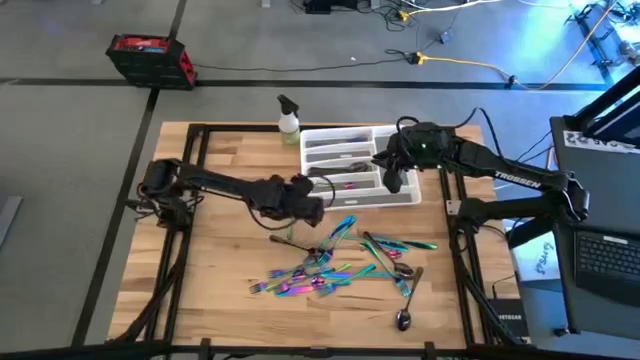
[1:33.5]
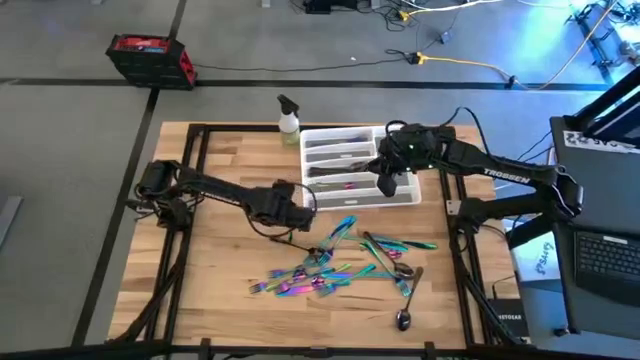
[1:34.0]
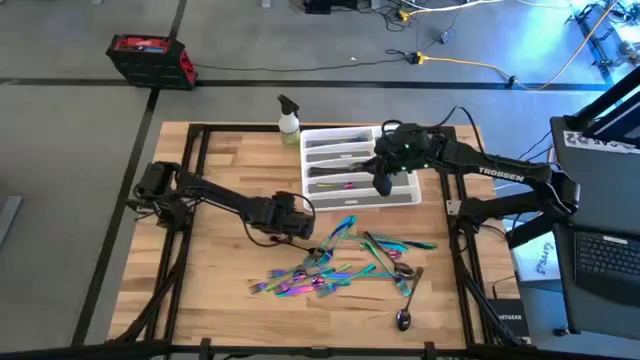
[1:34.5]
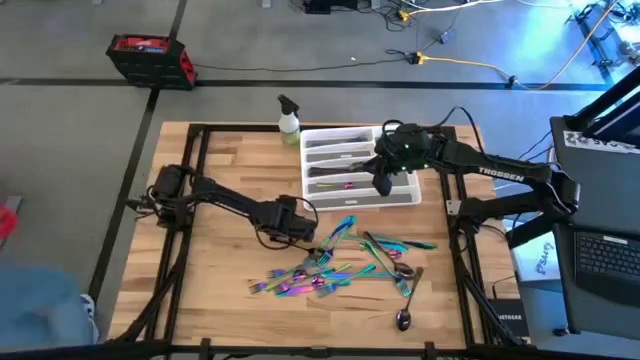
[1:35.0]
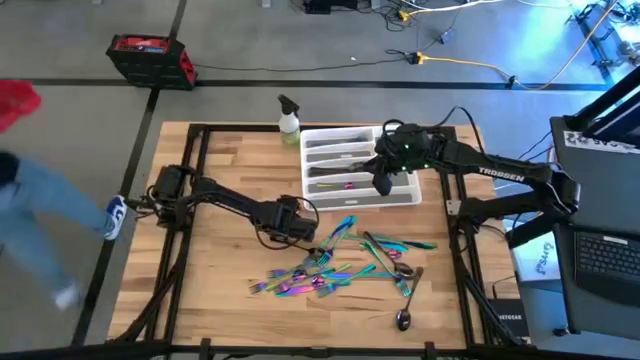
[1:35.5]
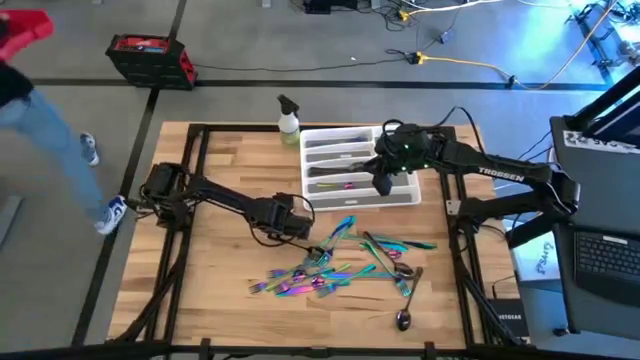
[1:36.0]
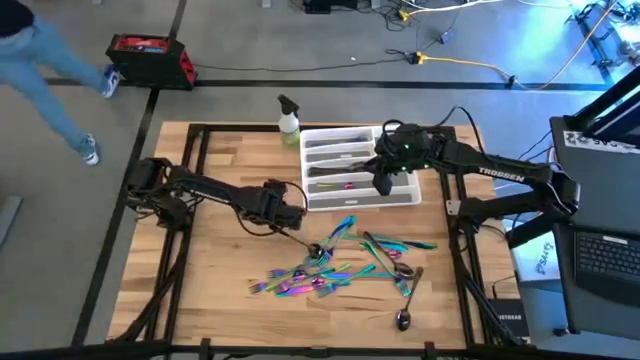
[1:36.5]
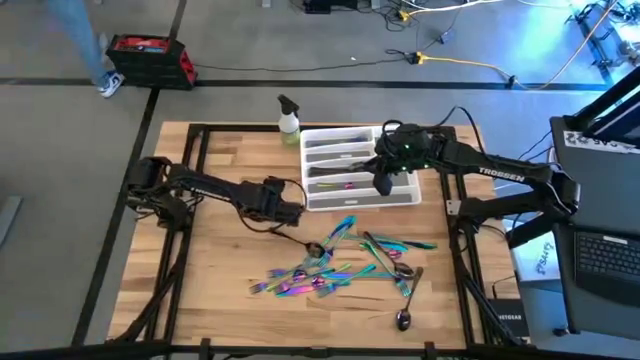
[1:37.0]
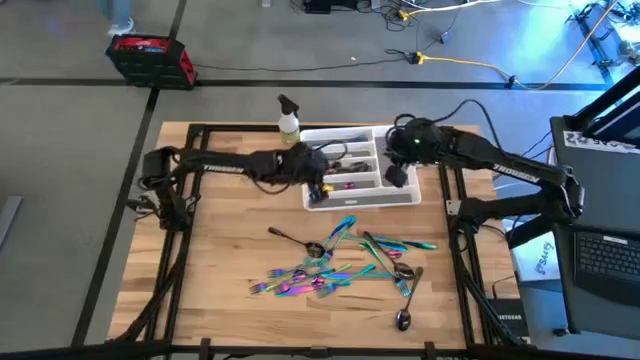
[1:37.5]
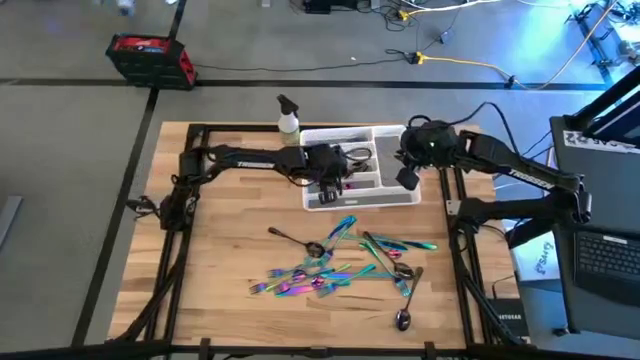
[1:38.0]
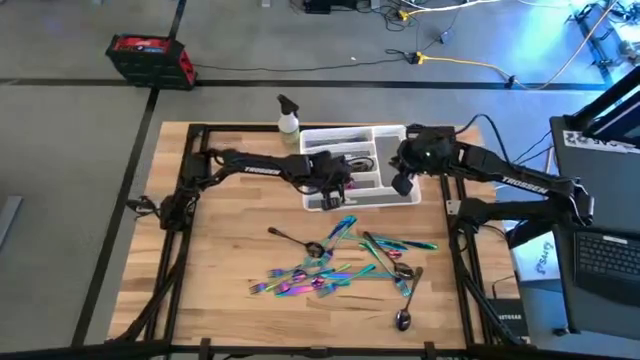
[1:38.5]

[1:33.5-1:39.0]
Task: Sort silverware
Put the blue teaspoon on the white silverware tray

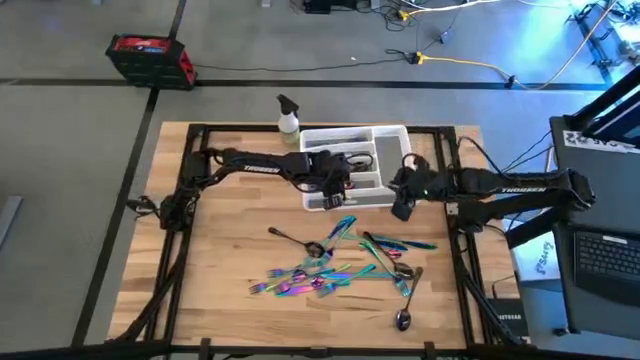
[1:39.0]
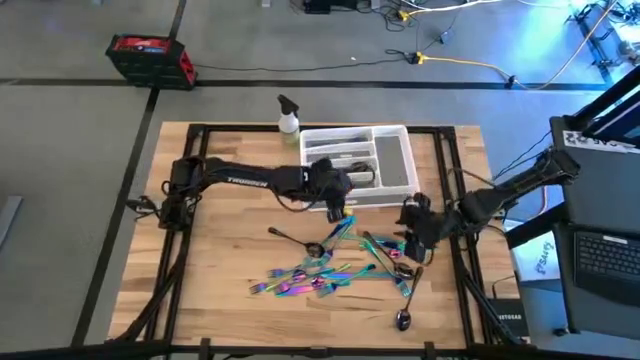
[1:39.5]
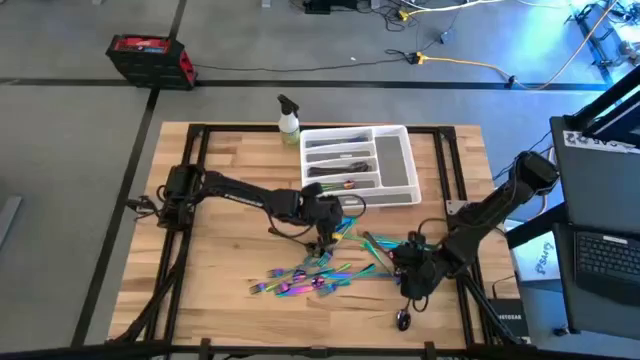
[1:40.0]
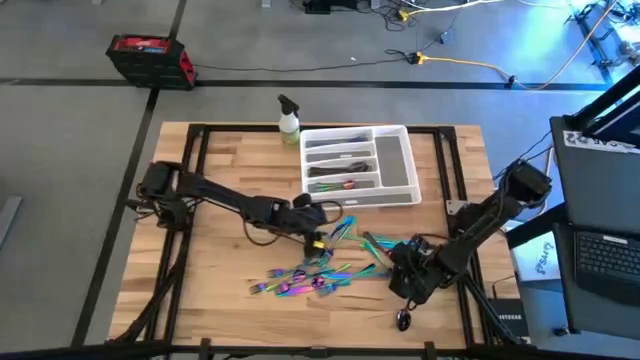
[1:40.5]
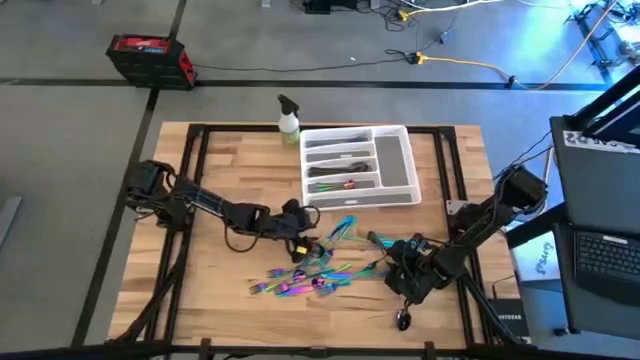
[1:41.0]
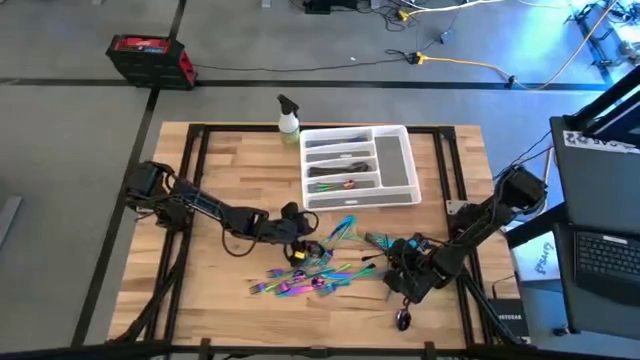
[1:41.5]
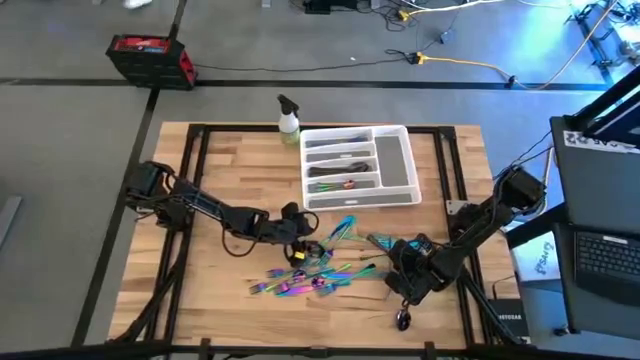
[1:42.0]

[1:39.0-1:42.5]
Put the black spoon on the white silverware tray

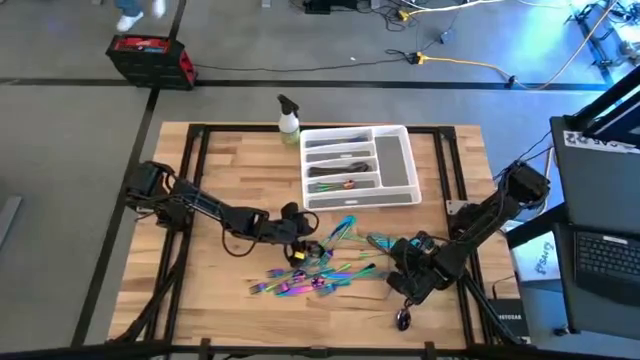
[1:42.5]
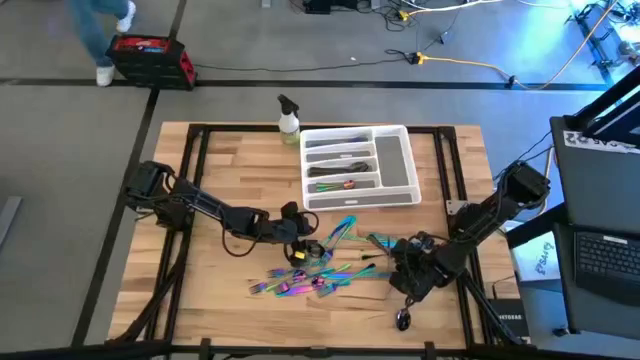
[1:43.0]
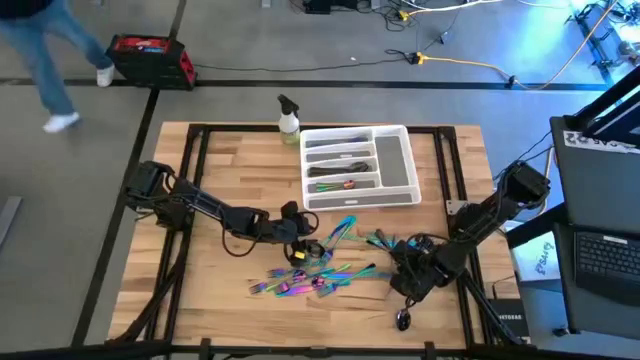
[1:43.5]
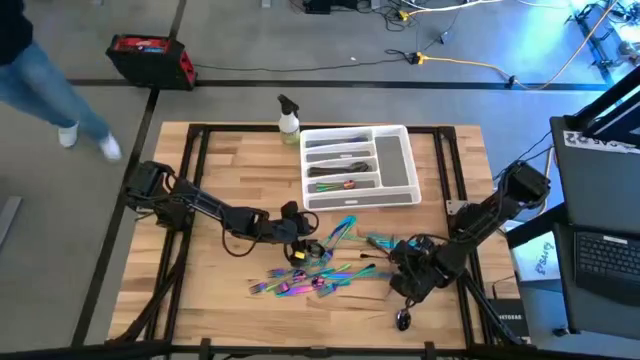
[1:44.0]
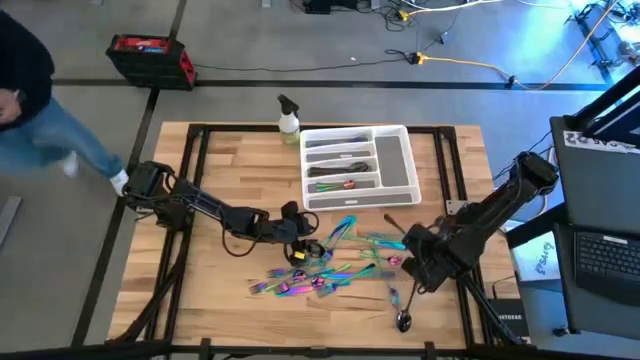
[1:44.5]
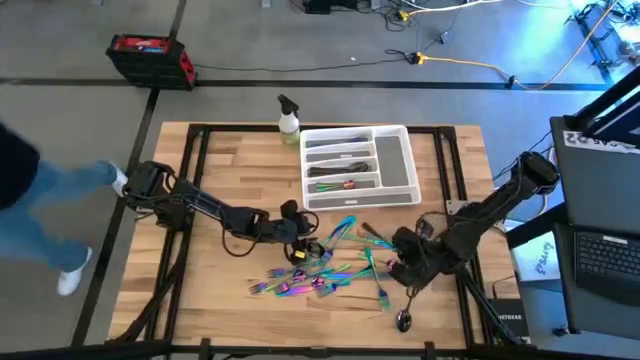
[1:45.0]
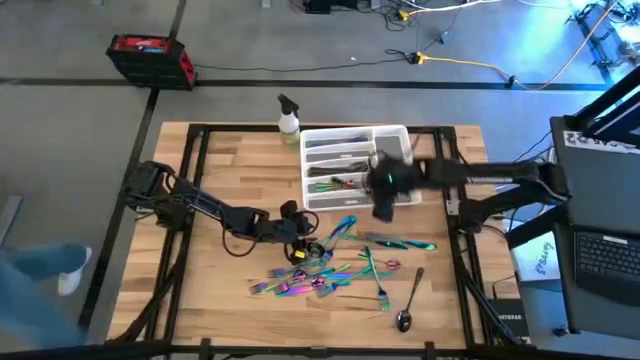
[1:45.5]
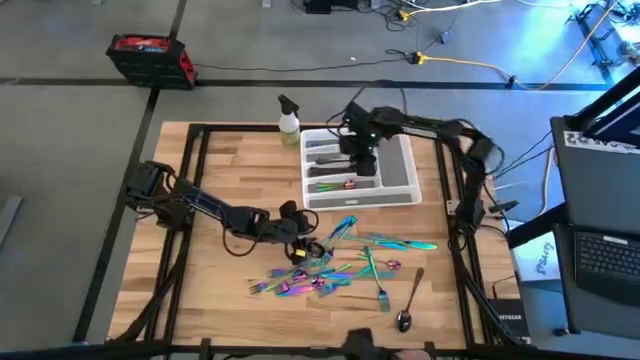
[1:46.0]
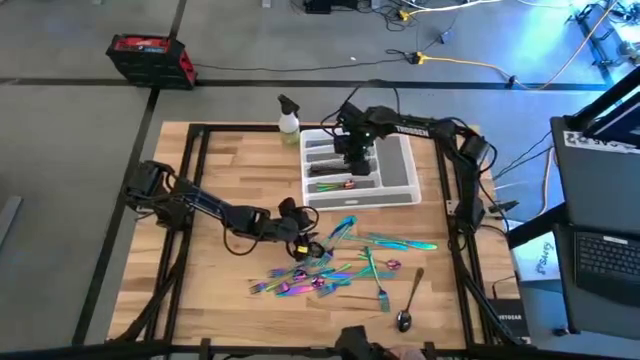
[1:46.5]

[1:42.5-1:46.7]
Put the black spoon on the white silverware tray

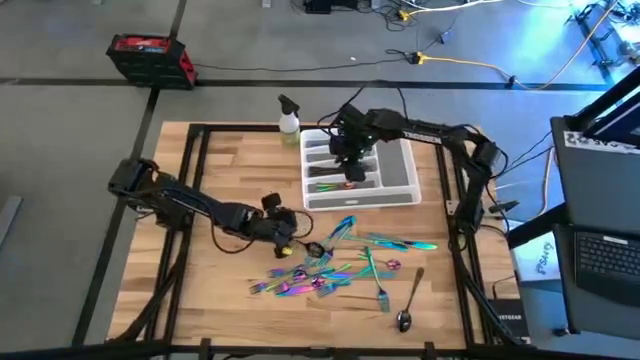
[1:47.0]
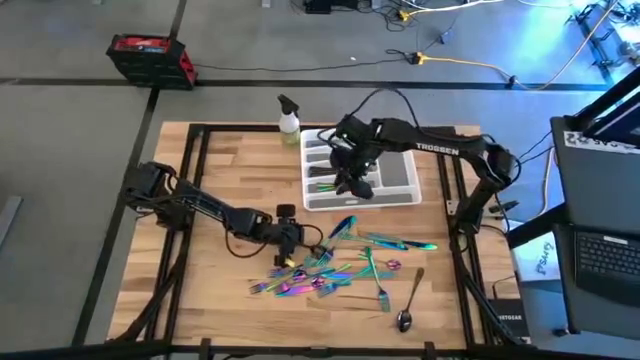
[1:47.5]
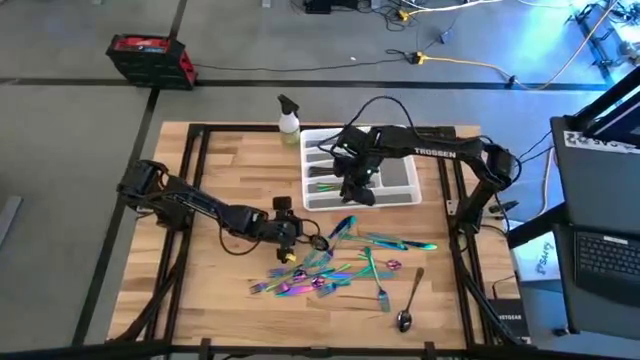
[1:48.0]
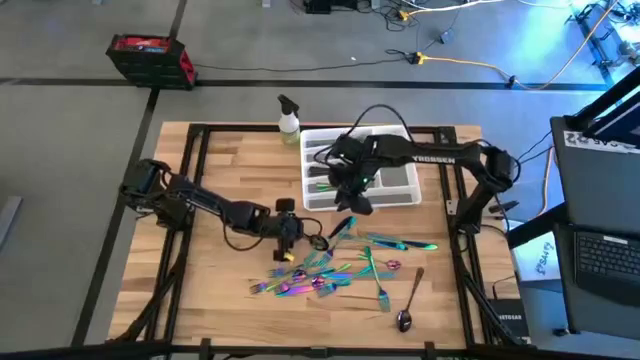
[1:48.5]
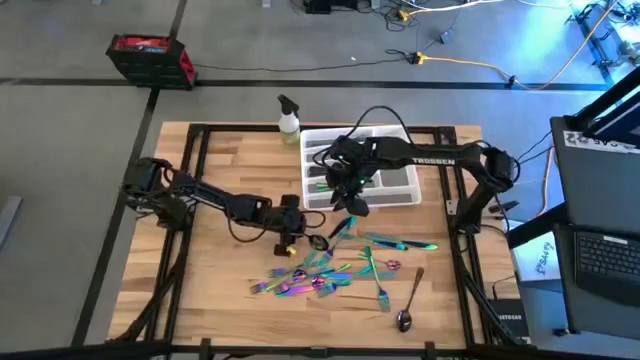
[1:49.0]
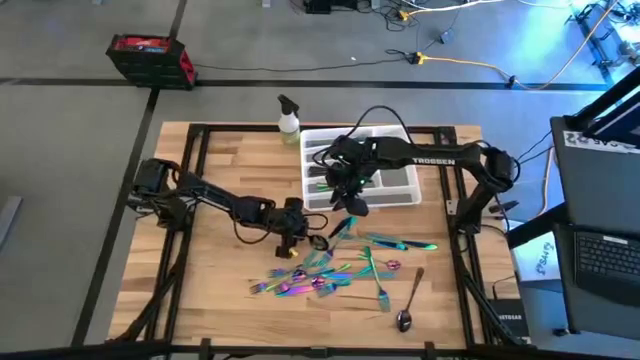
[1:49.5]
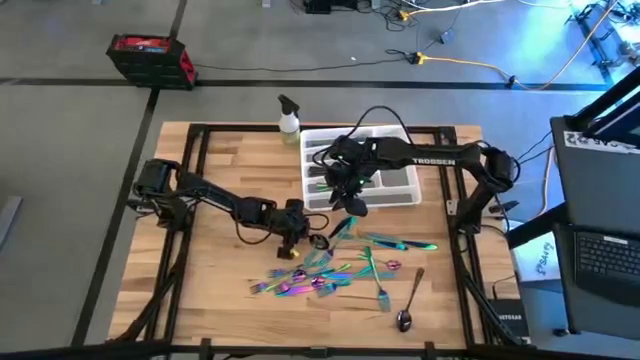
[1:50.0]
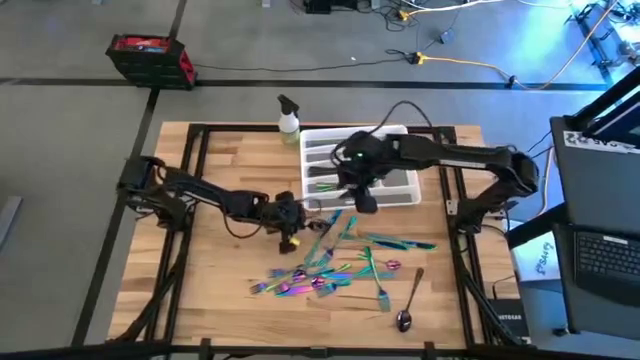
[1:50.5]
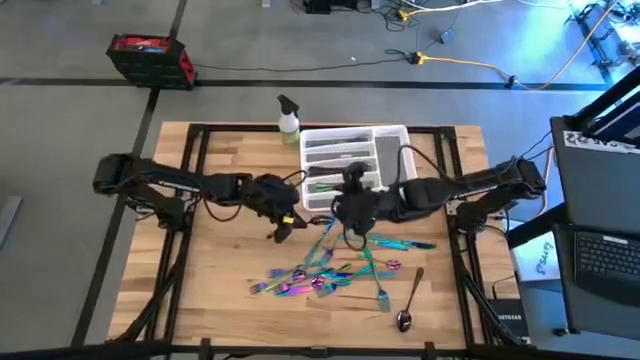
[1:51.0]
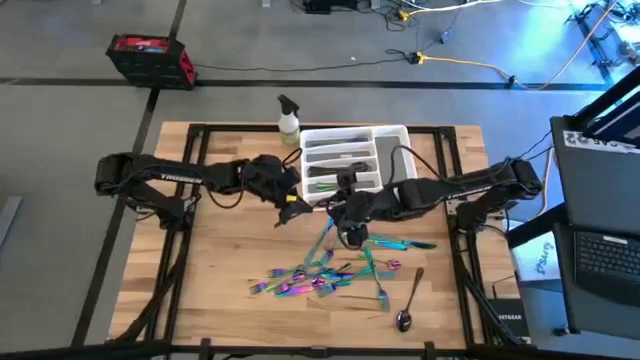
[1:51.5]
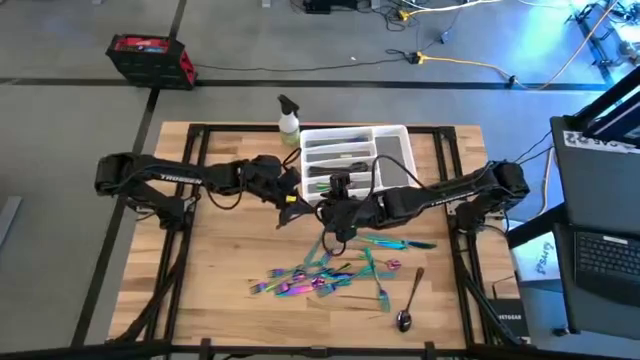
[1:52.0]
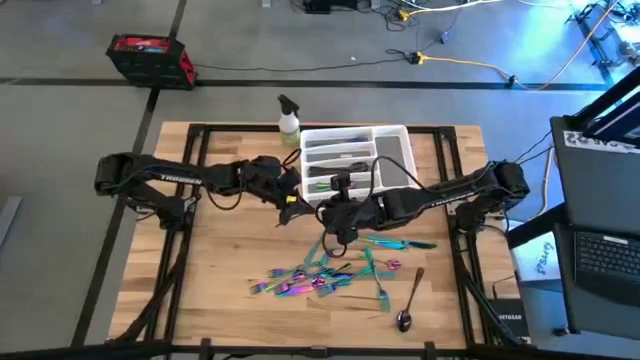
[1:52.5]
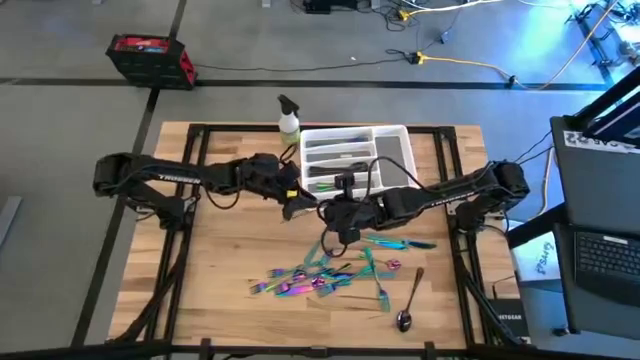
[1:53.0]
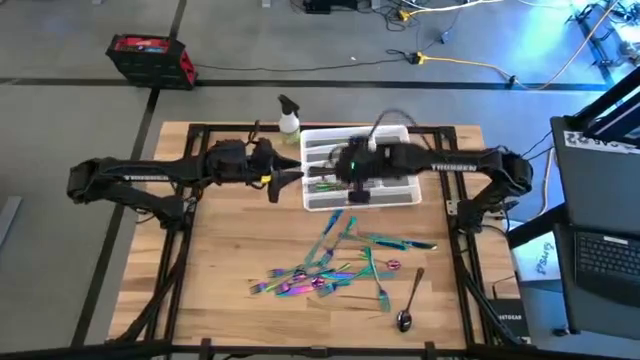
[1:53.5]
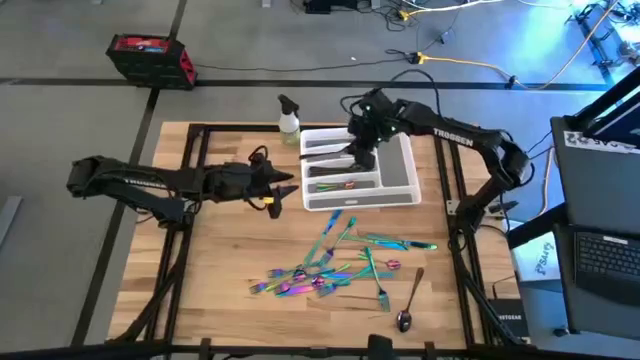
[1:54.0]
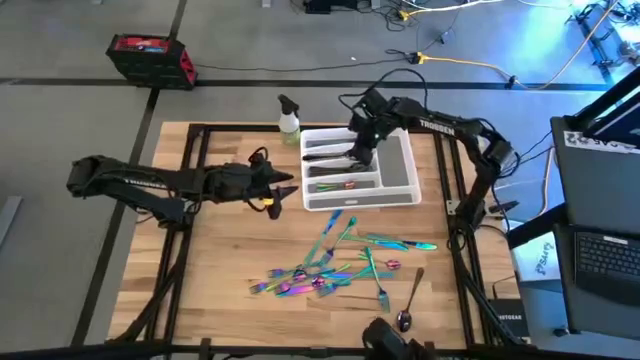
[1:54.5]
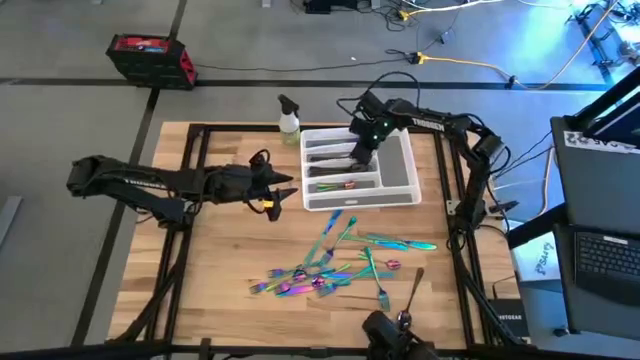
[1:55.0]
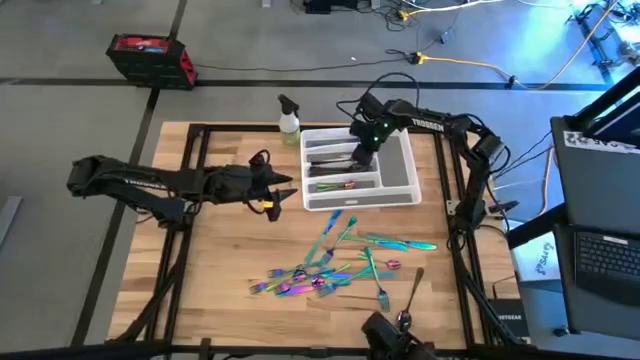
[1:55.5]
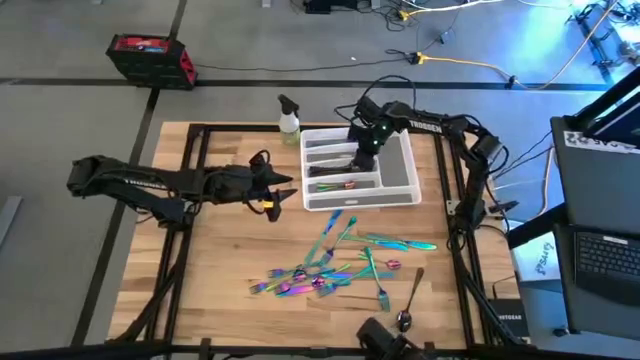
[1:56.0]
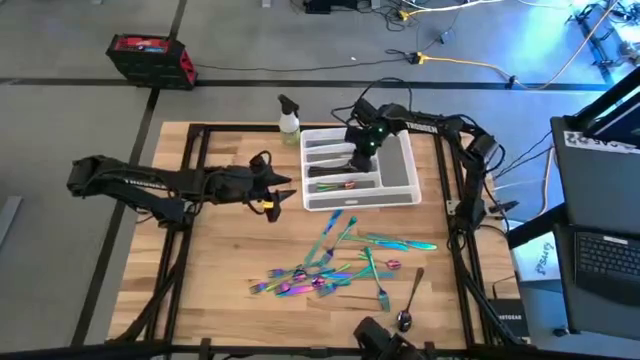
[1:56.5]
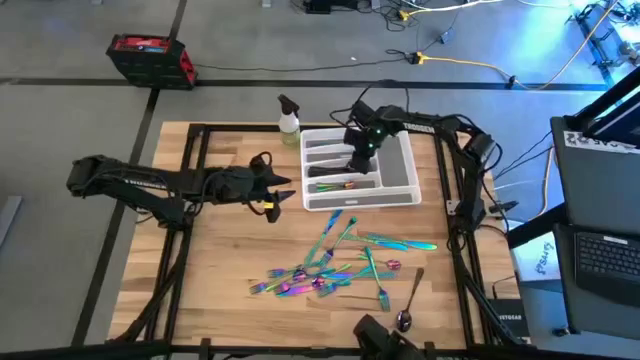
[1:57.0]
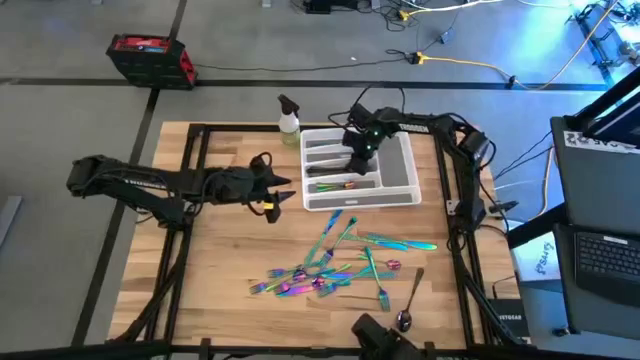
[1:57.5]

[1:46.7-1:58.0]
Put the black spoon on the white silverware tray
